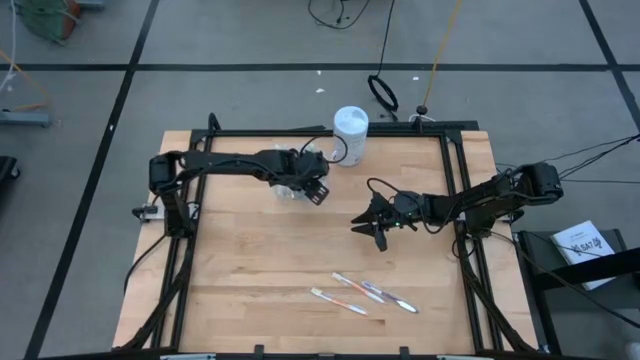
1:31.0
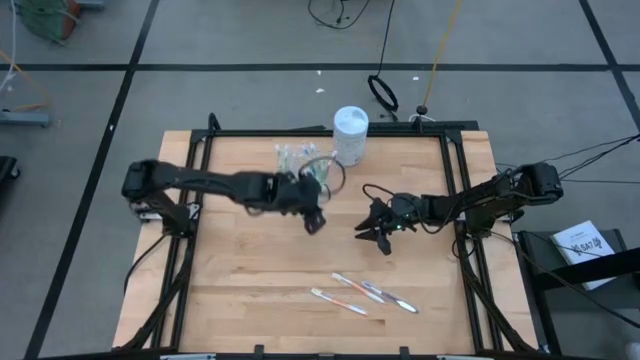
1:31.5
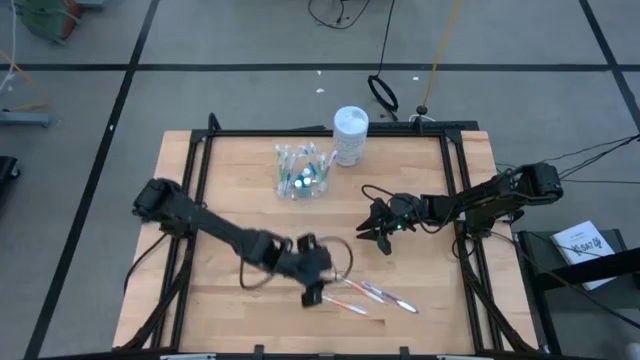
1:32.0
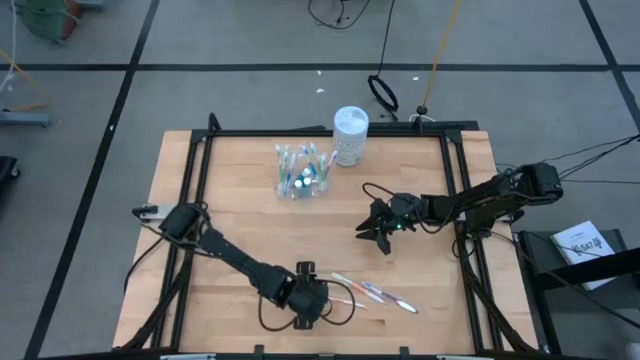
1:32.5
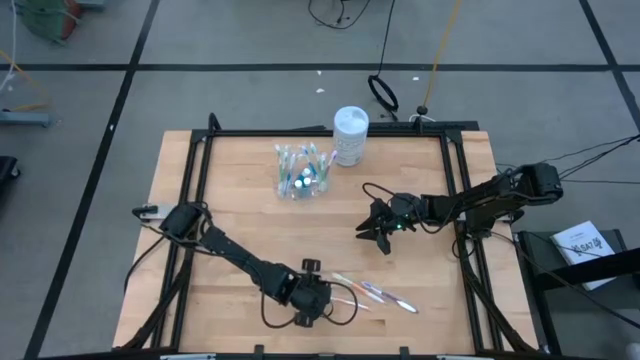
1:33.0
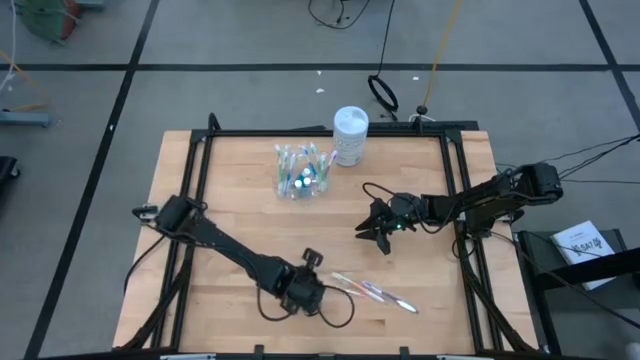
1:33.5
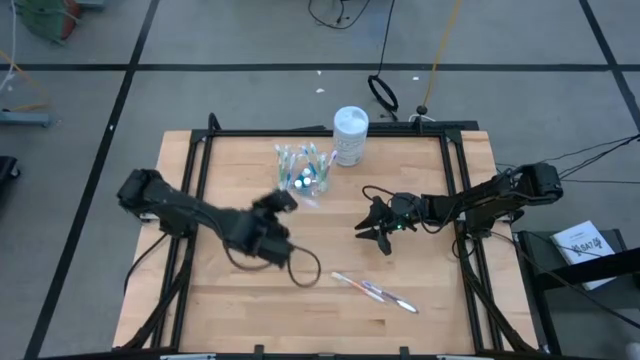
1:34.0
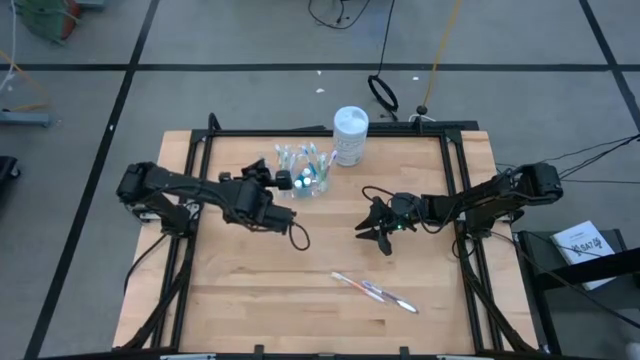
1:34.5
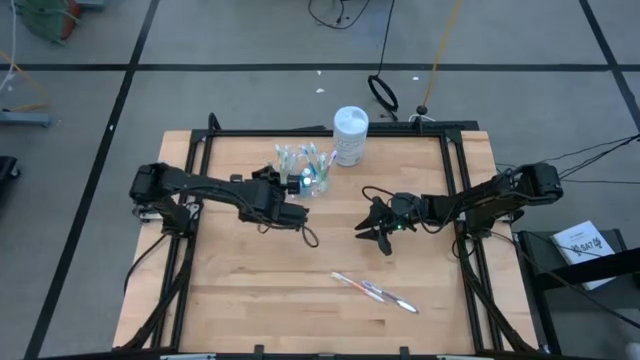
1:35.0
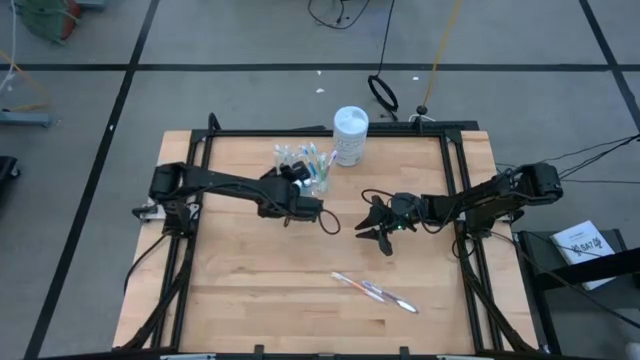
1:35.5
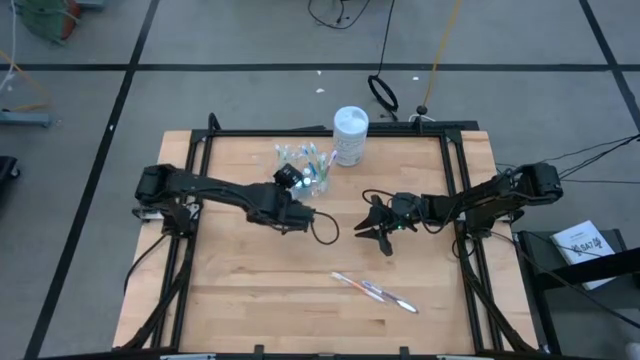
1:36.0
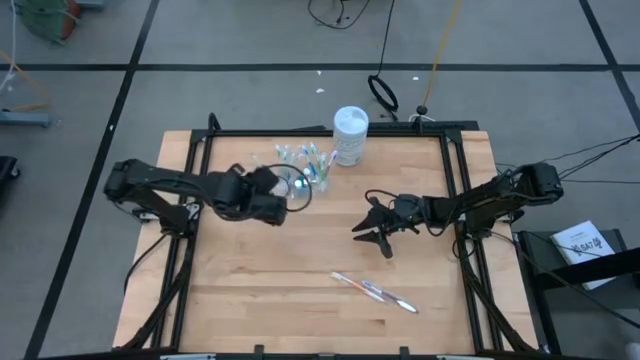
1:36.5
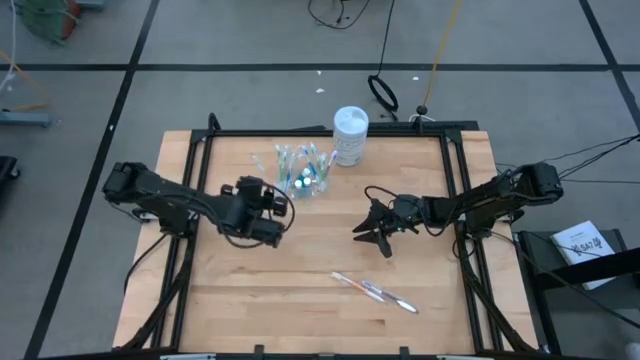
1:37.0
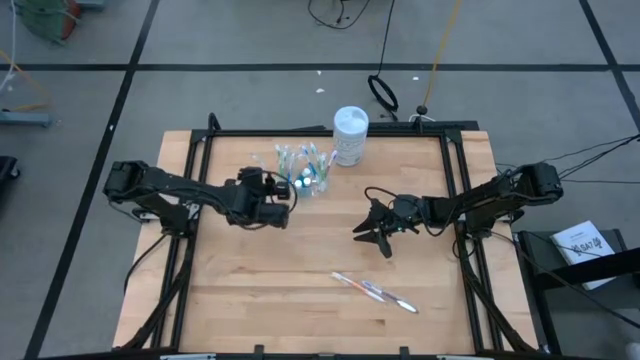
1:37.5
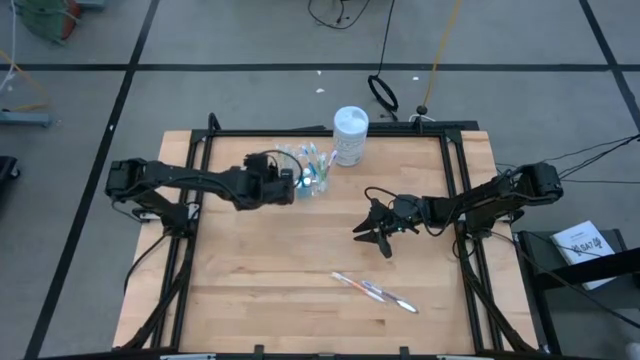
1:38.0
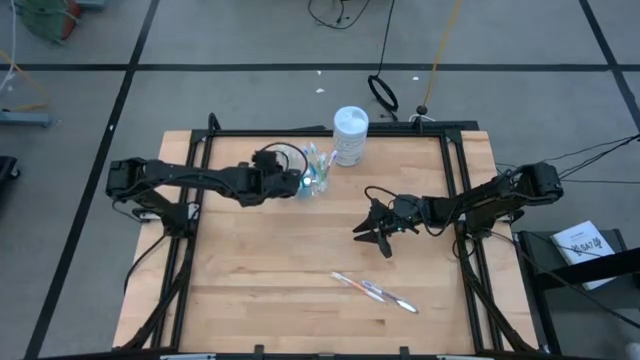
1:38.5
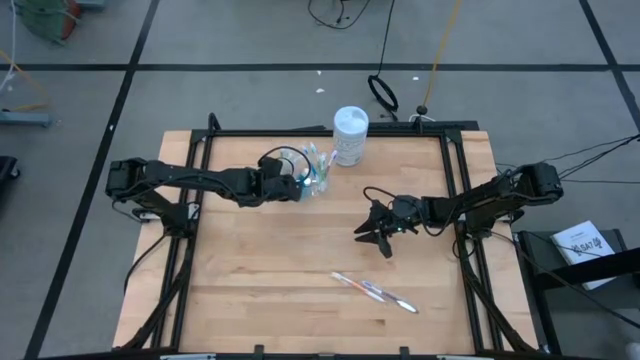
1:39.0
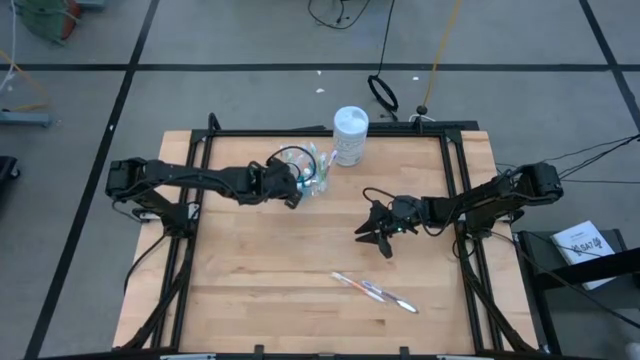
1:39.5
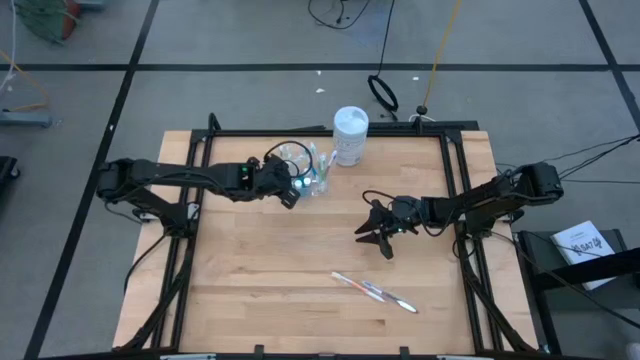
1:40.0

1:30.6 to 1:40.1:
Task: Pick & Place toothbrushing station
Put the orange toothbrush into the transparent organizer

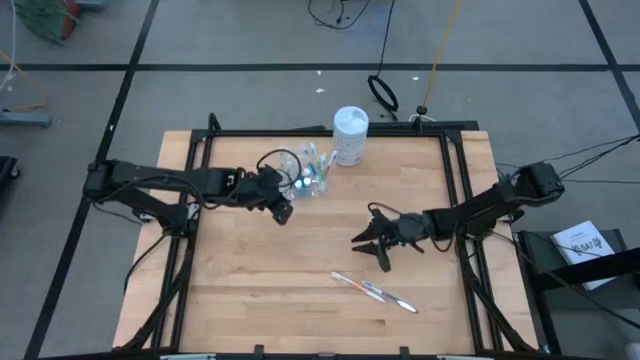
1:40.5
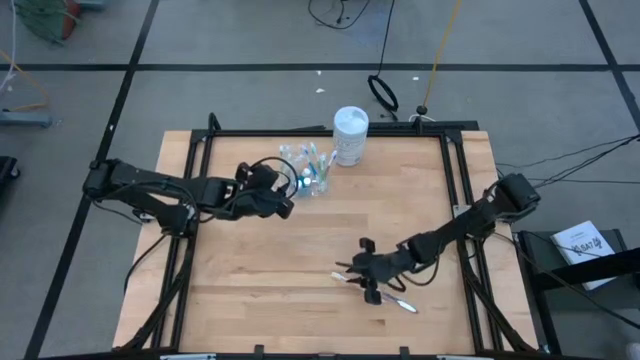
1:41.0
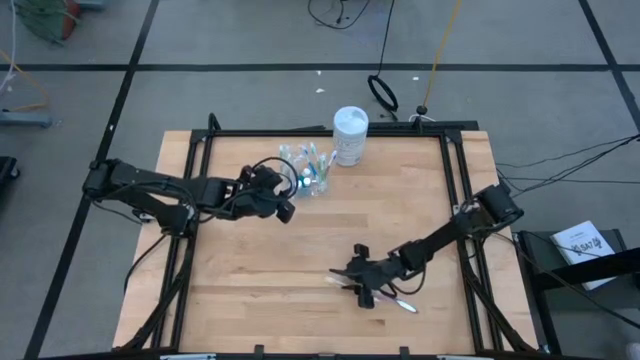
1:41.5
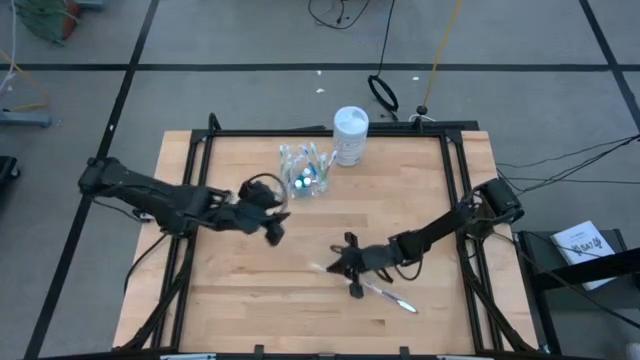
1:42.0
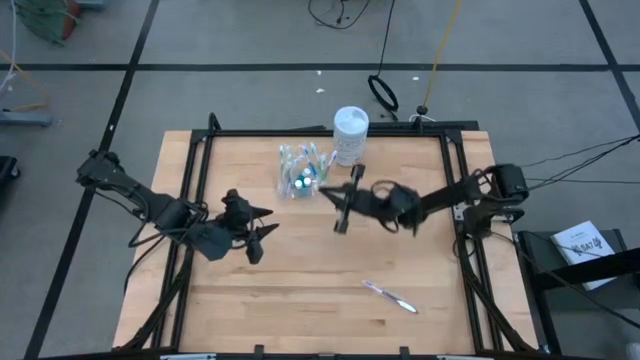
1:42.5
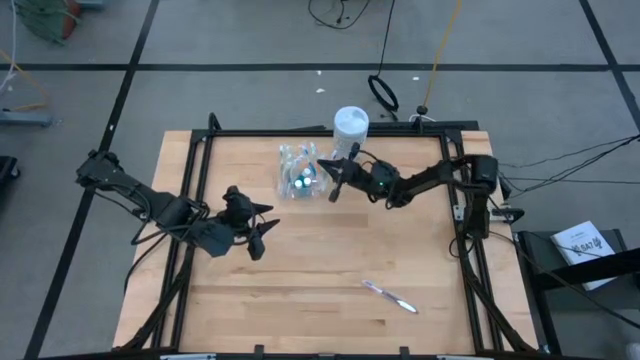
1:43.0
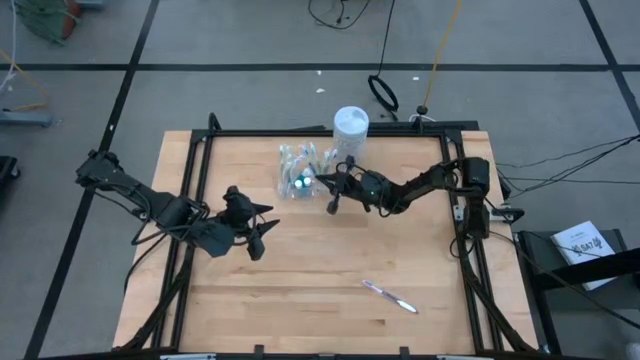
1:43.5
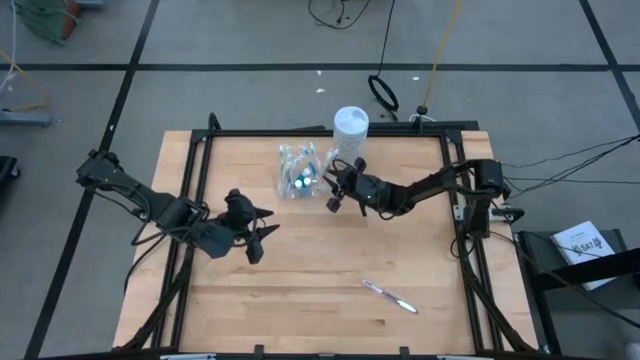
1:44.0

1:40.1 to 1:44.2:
Put the orange toothbrush into the transparent organizer

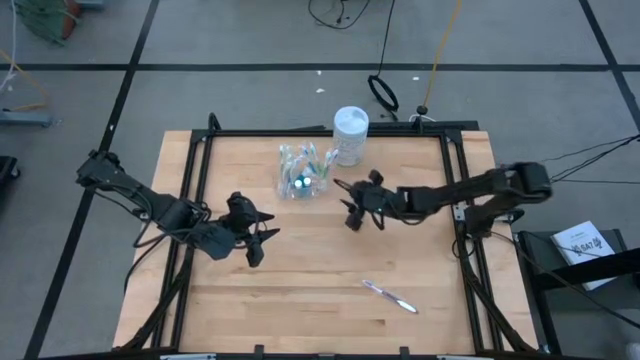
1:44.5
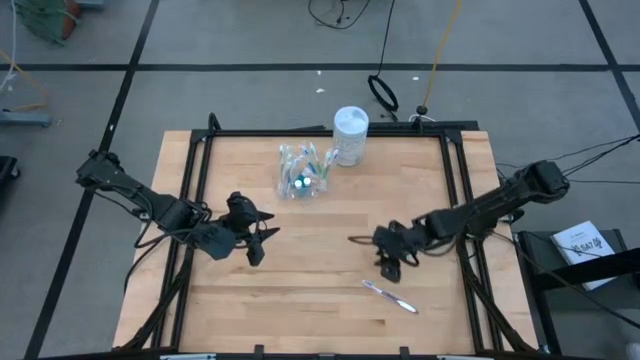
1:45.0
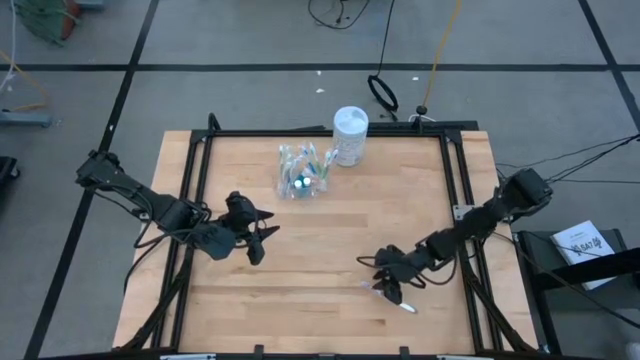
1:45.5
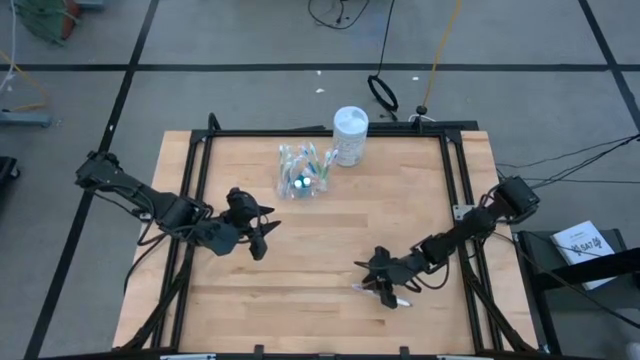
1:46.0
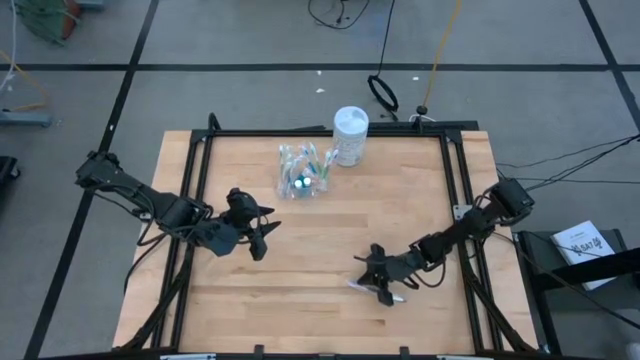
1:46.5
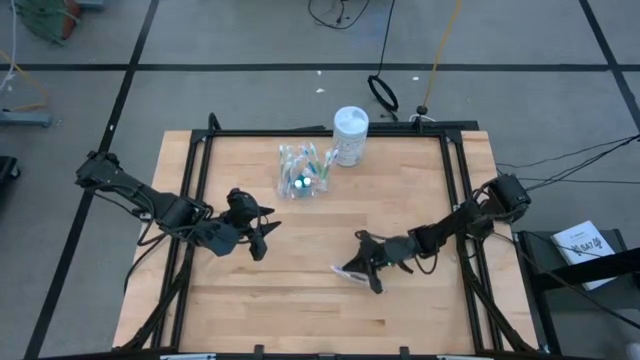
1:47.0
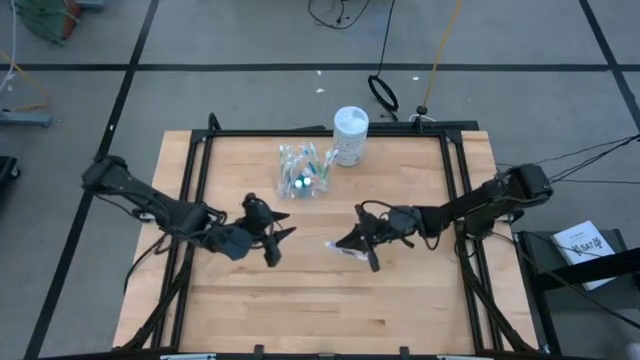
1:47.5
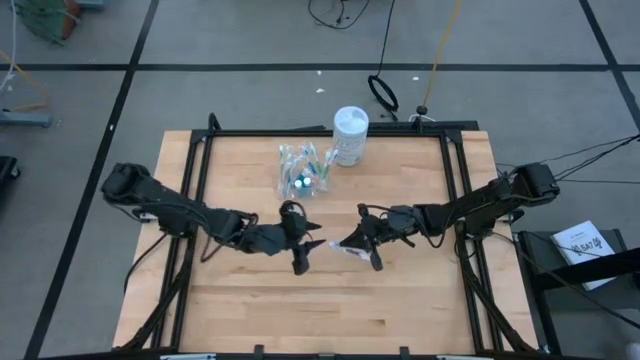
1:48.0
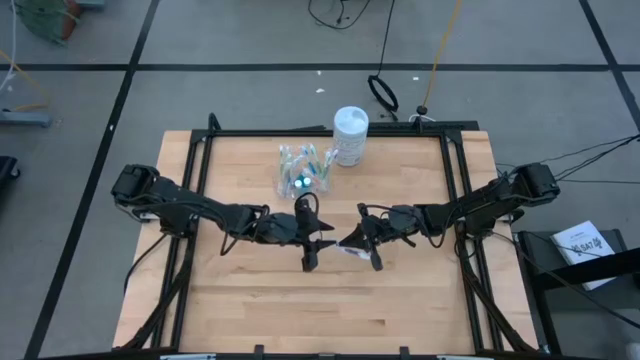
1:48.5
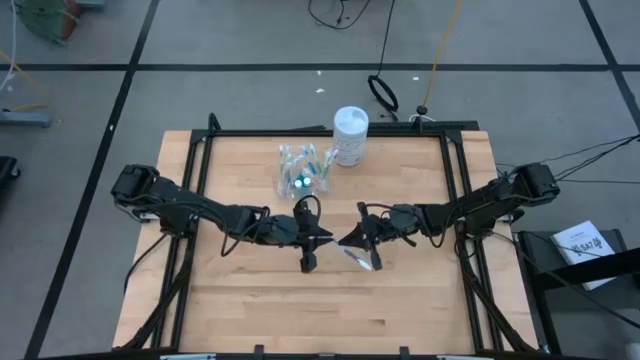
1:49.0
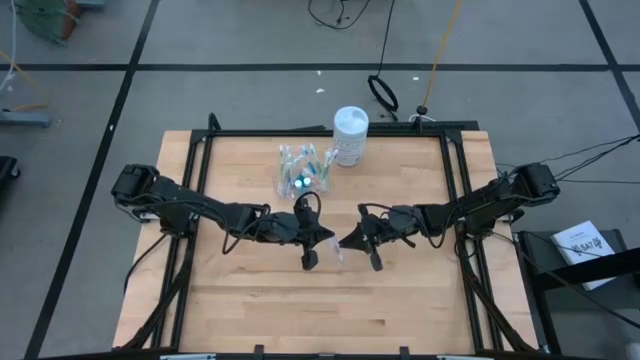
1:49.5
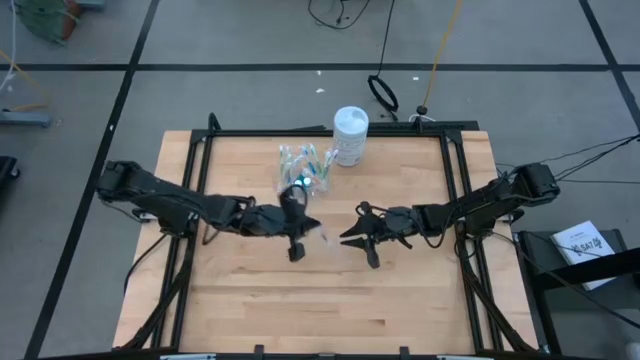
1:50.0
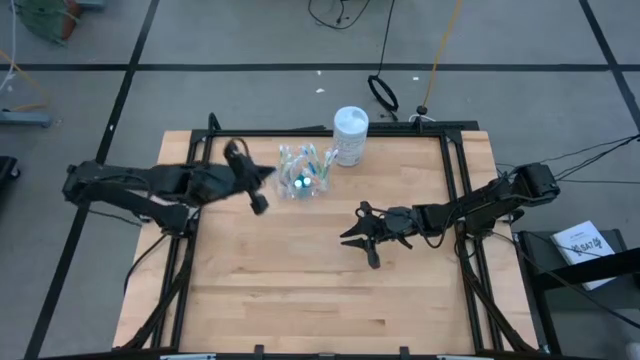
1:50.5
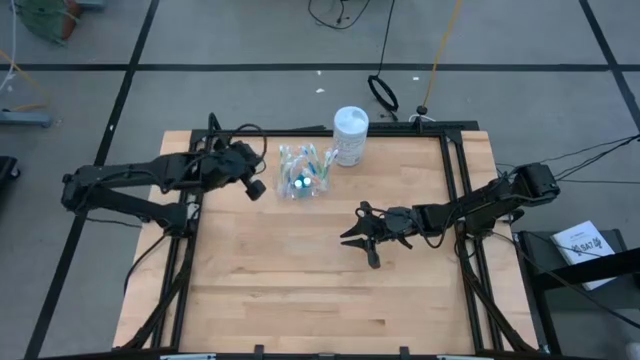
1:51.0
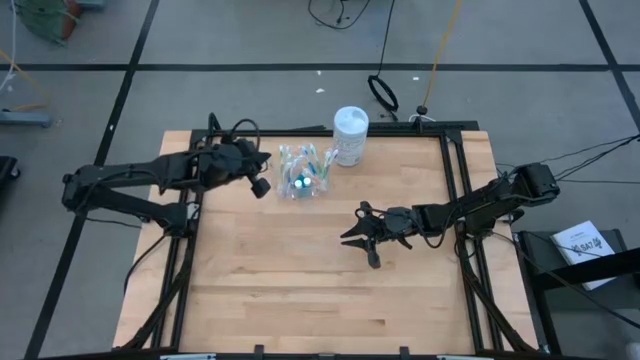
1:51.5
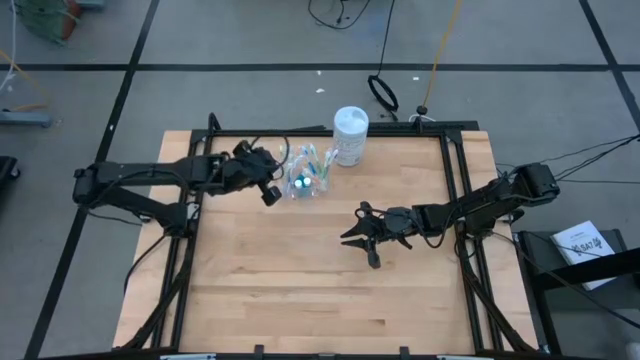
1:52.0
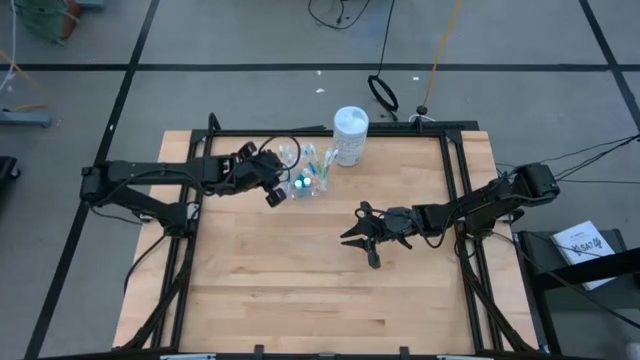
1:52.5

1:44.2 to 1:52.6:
Put the purple toothbrush into the transparent organizer
